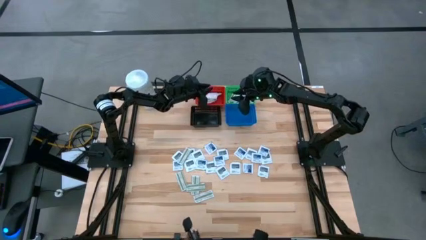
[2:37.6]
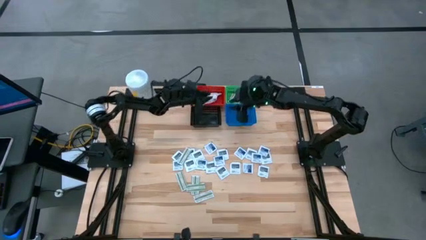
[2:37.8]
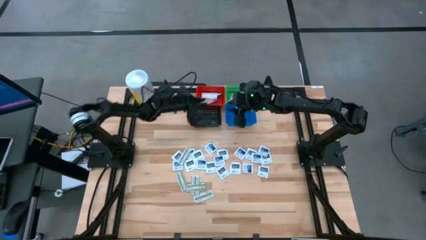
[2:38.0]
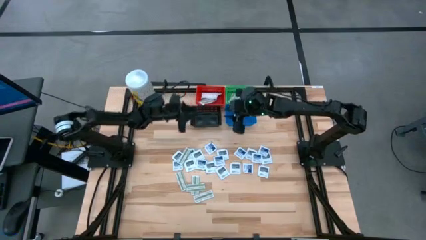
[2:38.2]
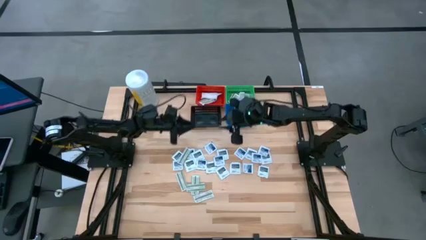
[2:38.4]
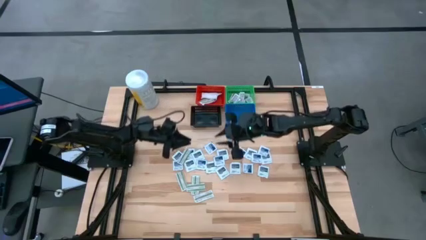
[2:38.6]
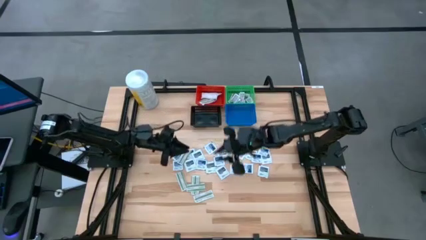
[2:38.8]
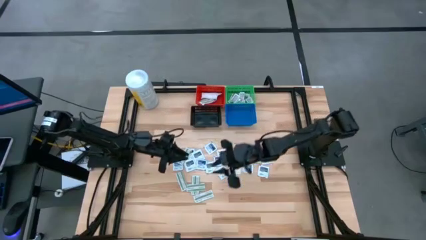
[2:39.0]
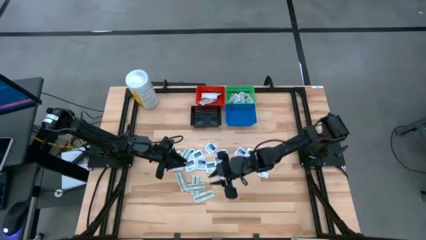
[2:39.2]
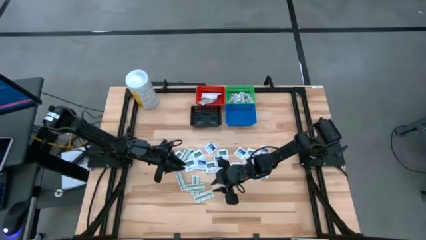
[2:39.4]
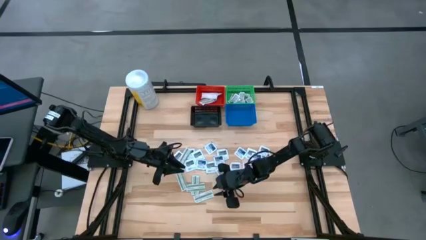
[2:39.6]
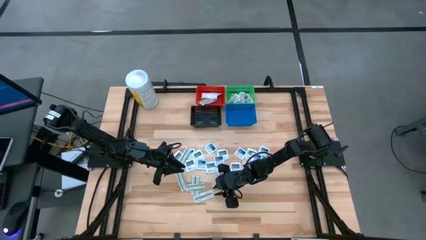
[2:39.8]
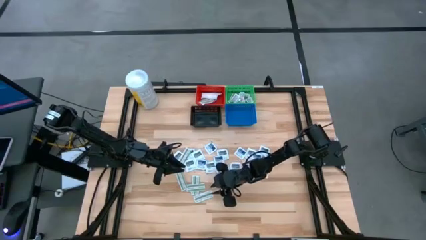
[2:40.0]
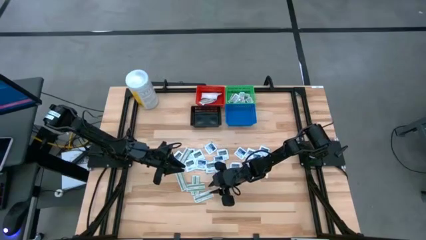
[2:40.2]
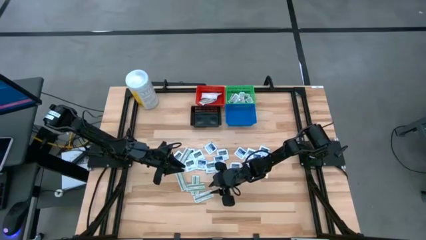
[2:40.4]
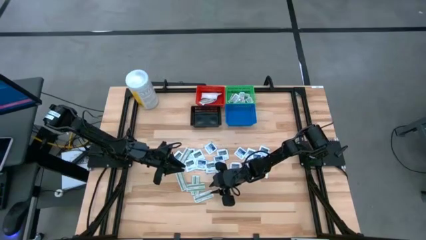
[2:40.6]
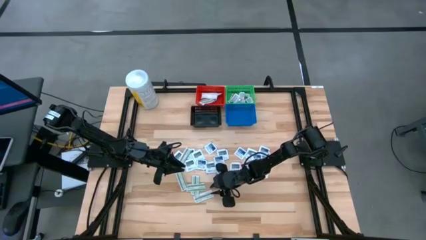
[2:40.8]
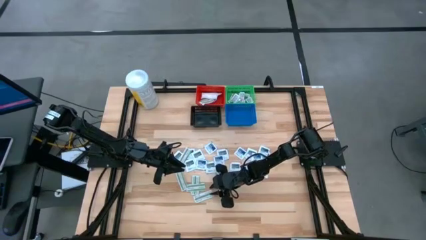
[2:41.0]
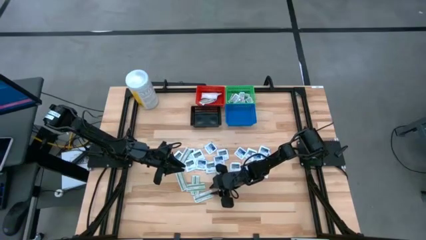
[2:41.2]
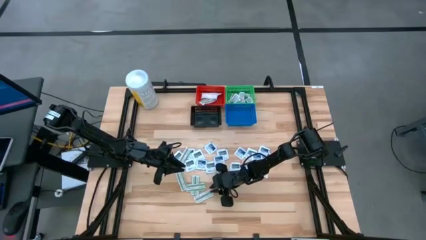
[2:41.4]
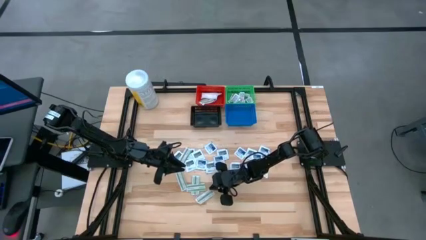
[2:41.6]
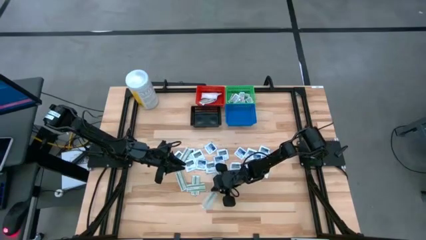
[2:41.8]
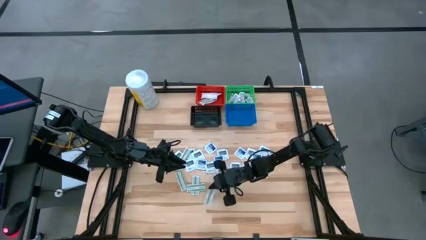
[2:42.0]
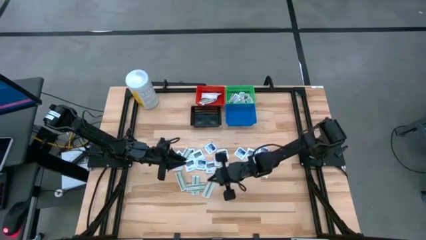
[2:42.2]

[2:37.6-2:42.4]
Task: Pick & Place First Aid Supplies
Put the bandage into the red basket

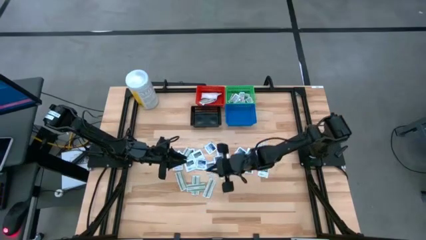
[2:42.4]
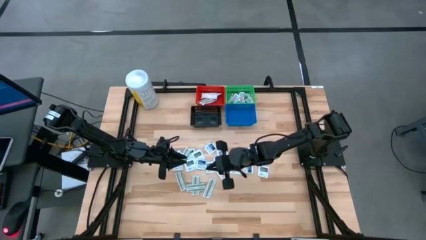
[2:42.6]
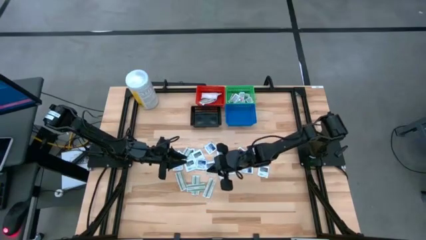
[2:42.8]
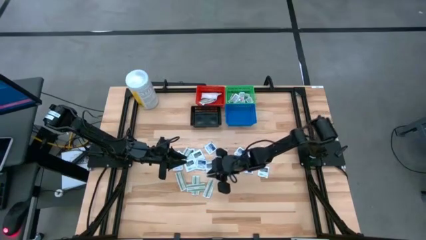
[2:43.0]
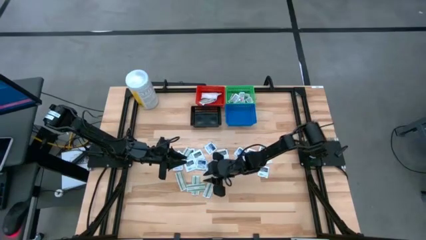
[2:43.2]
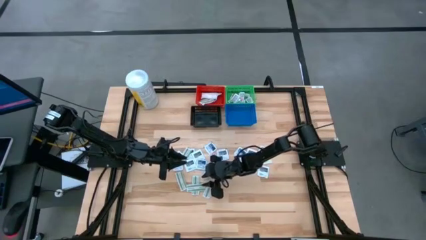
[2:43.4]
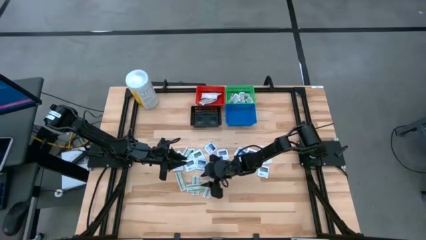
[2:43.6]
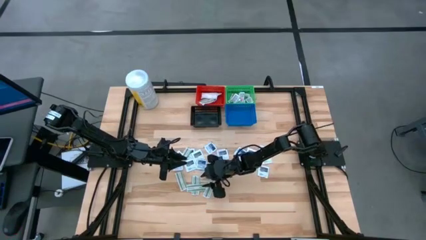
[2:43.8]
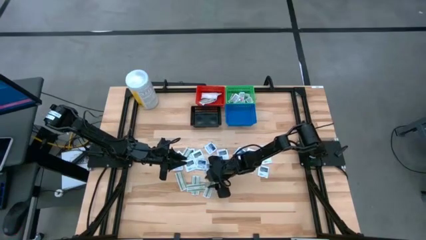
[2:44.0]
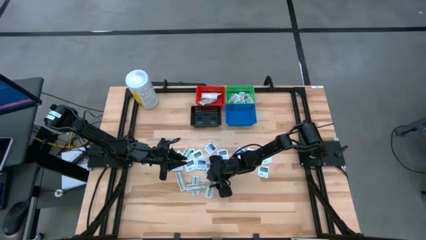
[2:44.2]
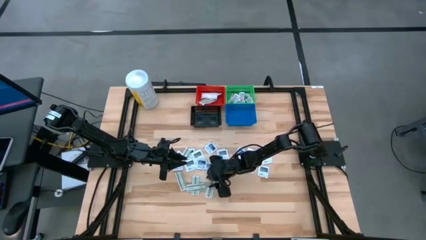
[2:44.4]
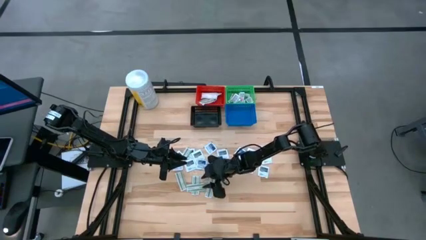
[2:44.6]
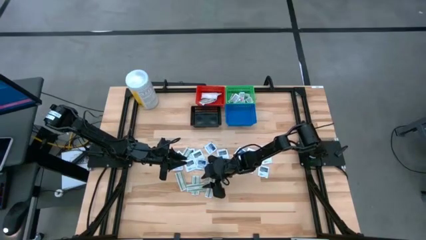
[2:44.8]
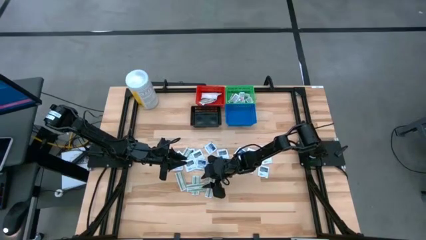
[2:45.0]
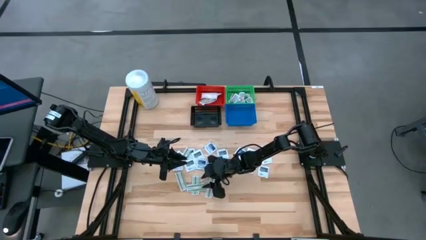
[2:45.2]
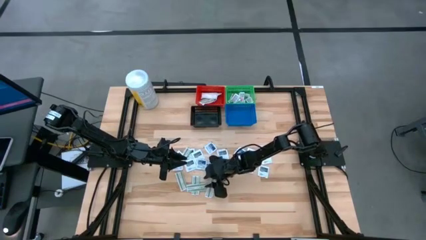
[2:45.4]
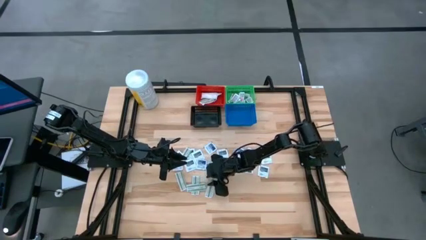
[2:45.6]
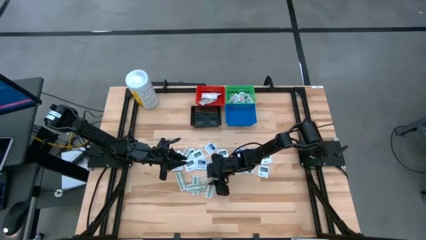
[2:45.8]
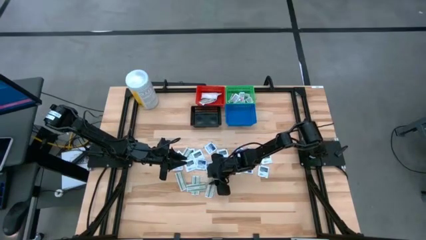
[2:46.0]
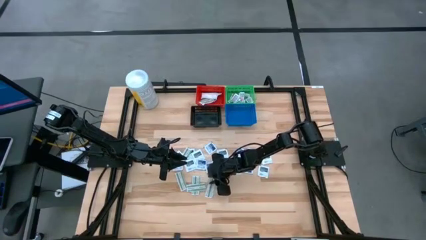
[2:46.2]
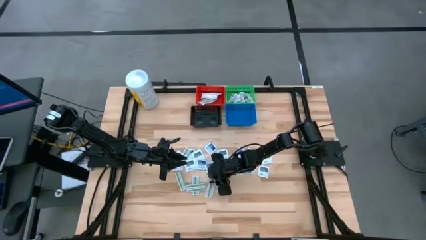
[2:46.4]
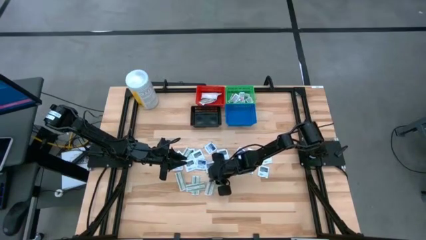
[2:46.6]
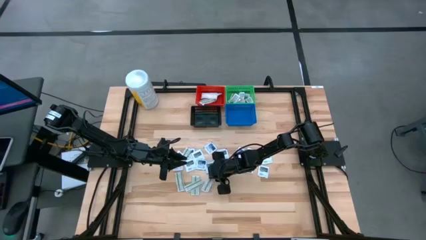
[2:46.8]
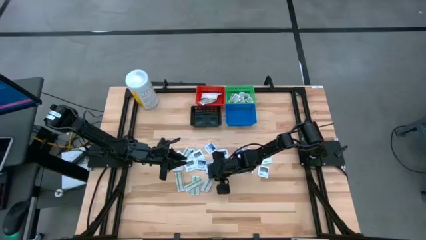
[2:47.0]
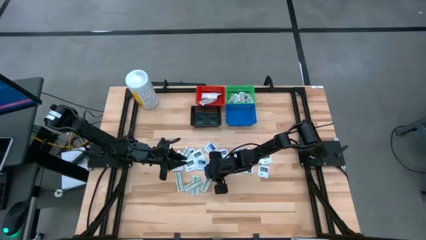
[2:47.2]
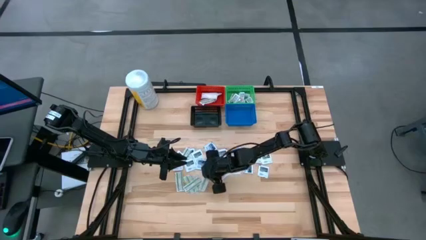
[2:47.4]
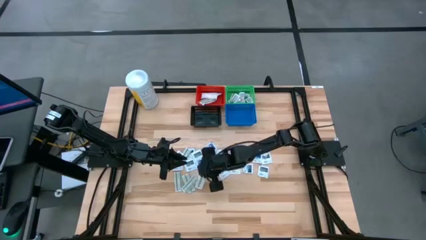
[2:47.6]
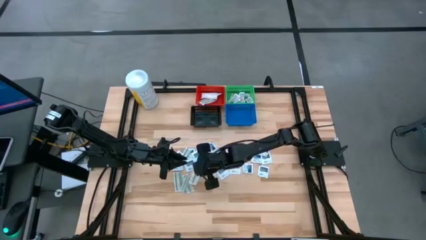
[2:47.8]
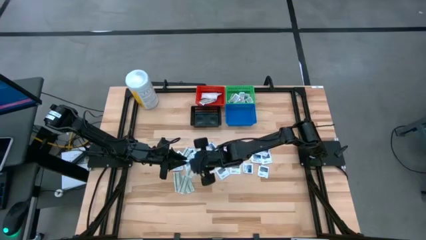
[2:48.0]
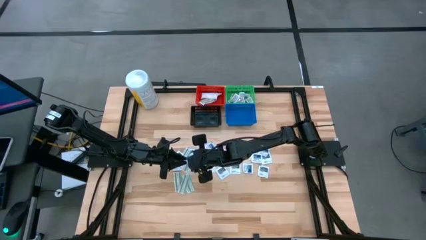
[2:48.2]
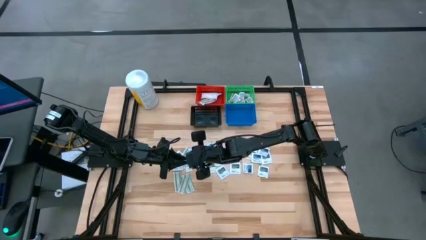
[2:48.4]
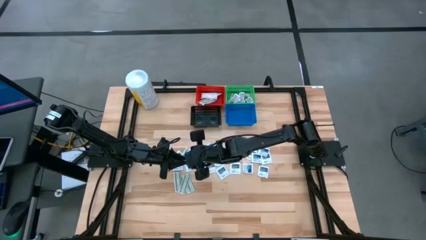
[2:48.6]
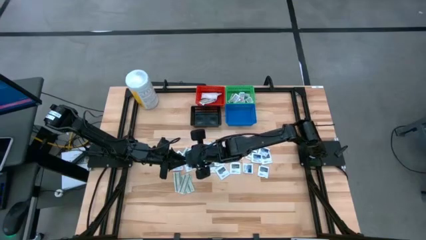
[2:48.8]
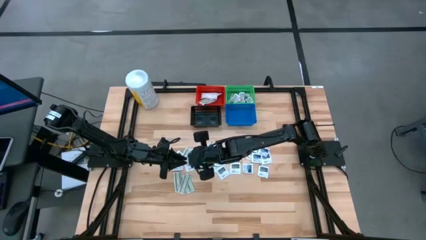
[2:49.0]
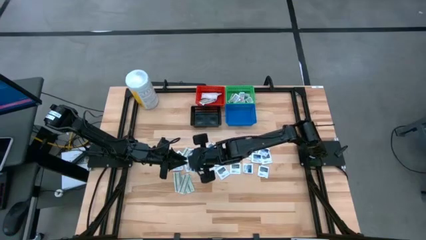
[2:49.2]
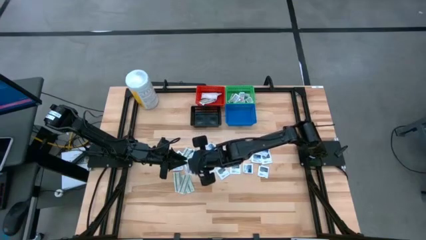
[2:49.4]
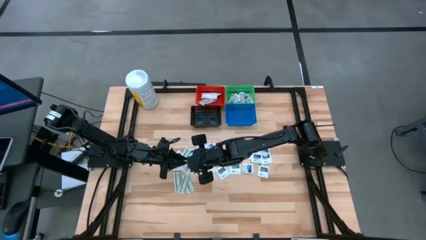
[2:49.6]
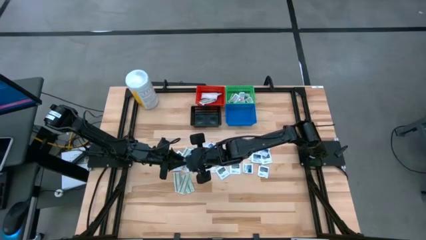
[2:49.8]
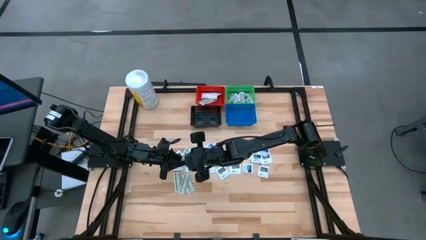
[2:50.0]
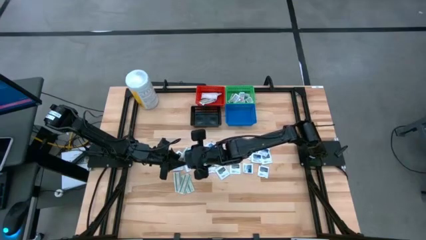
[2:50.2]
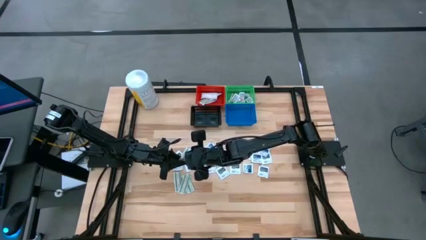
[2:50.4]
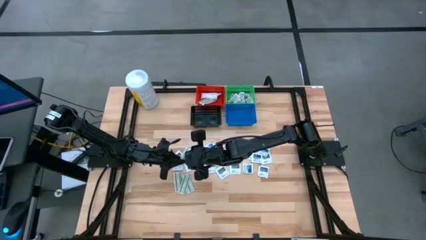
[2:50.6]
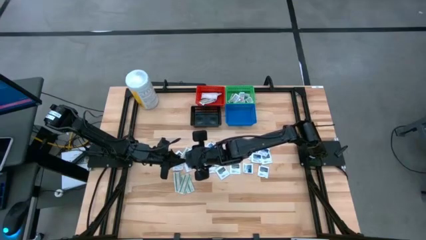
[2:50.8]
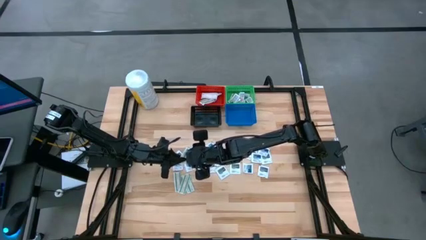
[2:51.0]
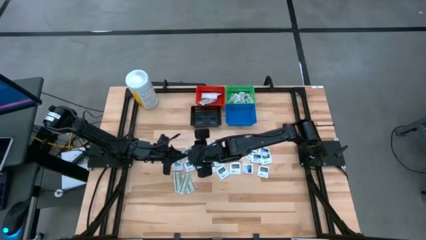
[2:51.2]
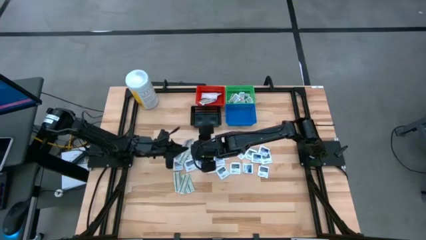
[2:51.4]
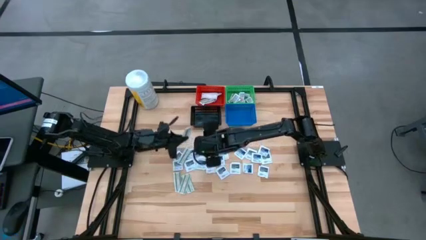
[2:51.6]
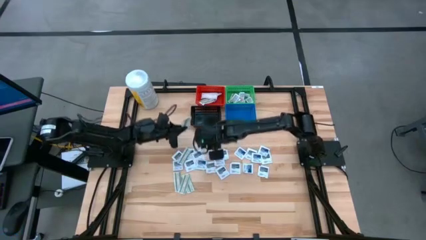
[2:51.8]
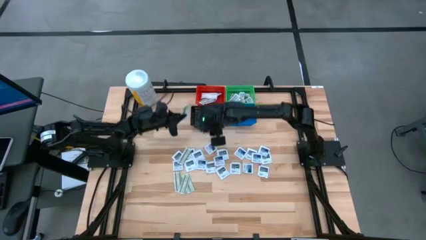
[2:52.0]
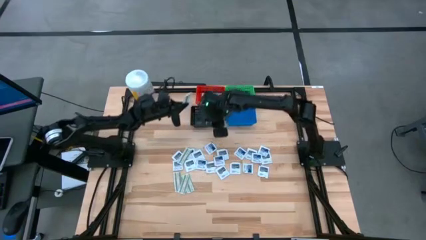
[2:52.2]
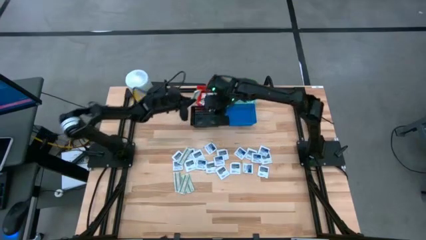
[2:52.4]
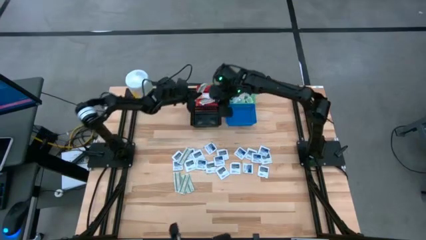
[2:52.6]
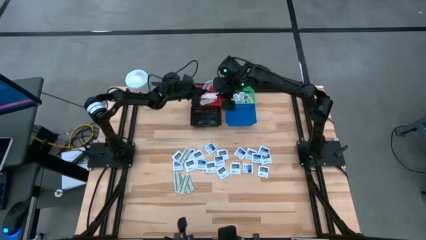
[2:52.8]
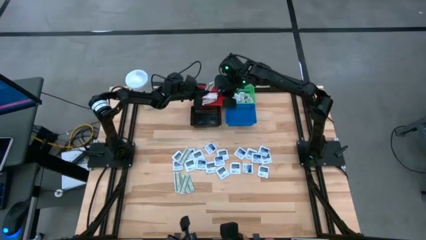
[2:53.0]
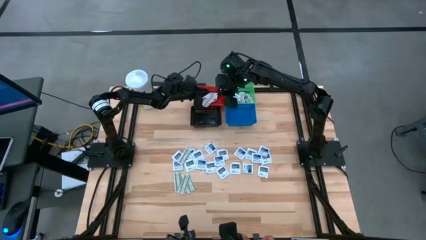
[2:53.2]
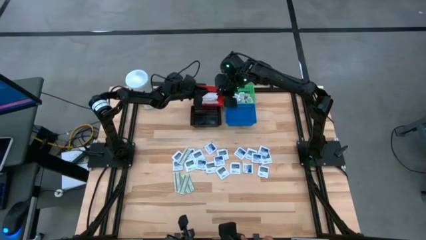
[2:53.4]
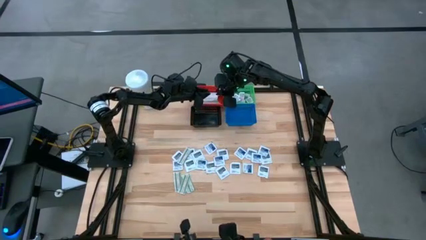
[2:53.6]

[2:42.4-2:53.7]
Put the bandage into the red basket
